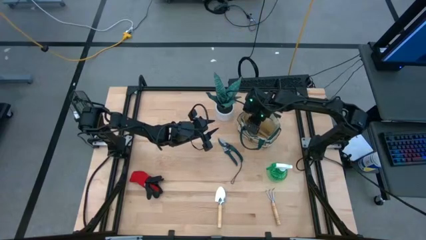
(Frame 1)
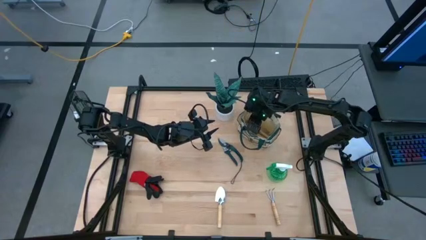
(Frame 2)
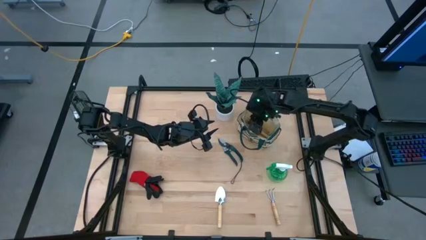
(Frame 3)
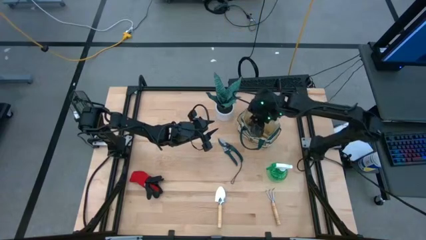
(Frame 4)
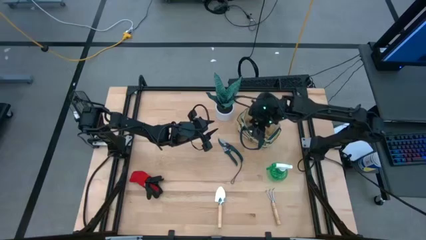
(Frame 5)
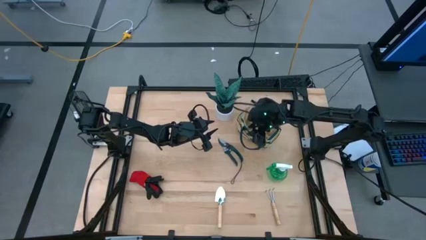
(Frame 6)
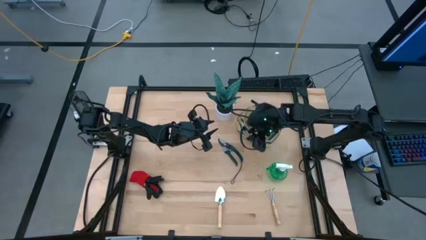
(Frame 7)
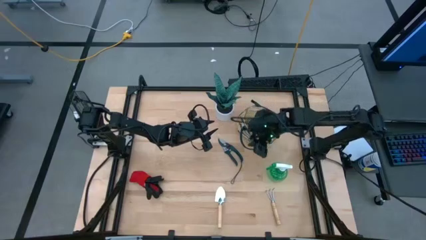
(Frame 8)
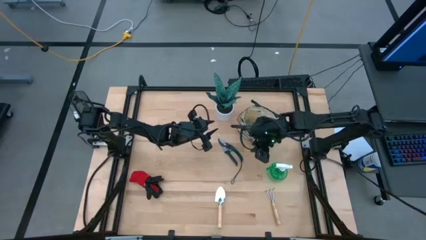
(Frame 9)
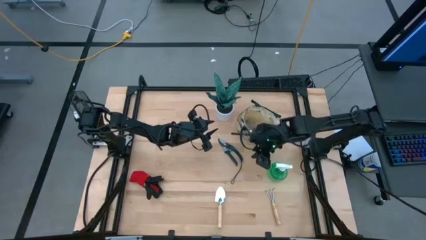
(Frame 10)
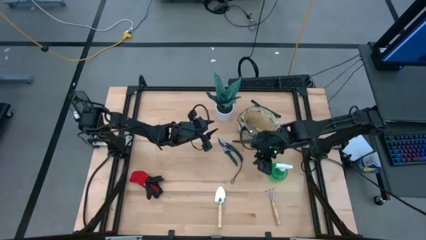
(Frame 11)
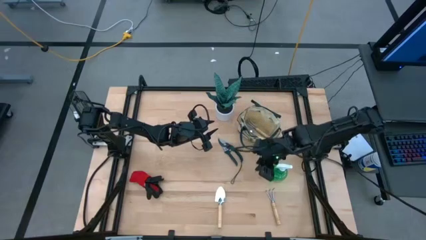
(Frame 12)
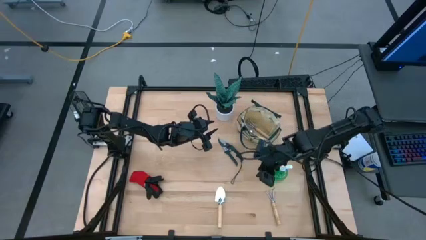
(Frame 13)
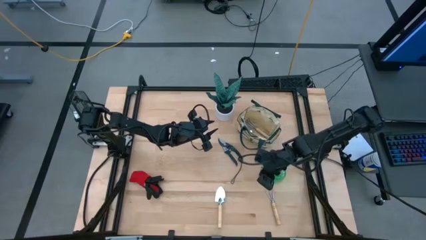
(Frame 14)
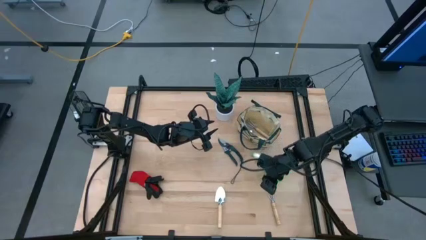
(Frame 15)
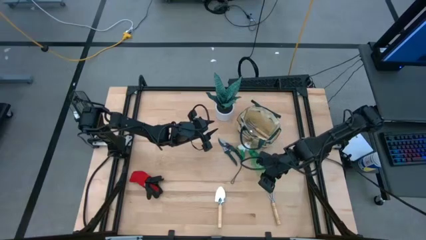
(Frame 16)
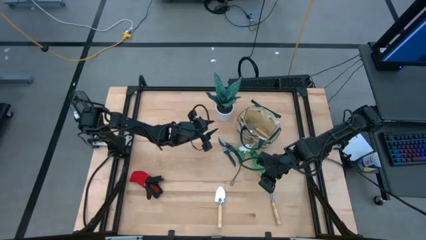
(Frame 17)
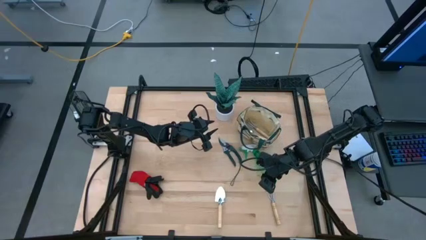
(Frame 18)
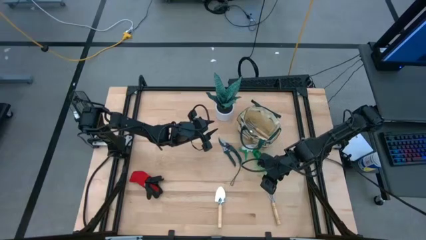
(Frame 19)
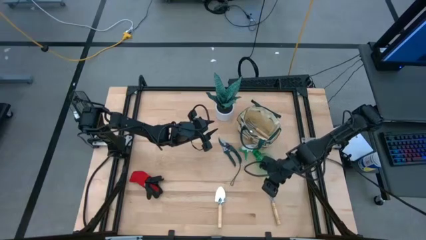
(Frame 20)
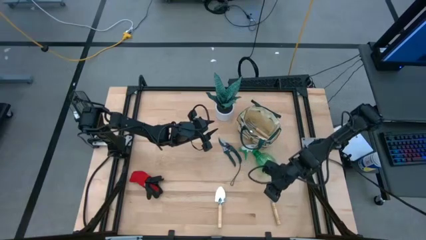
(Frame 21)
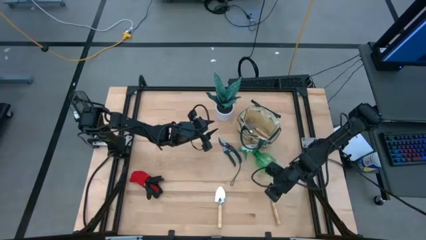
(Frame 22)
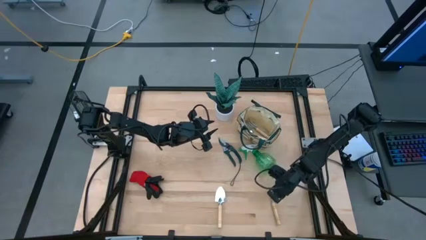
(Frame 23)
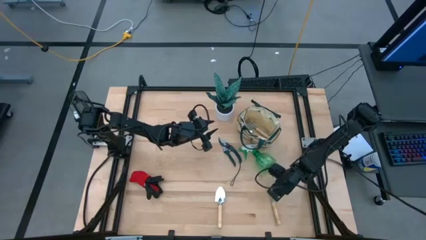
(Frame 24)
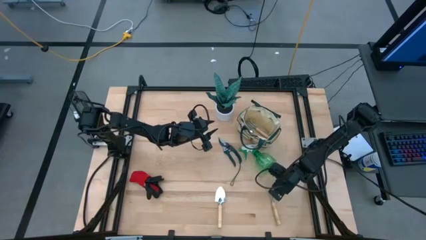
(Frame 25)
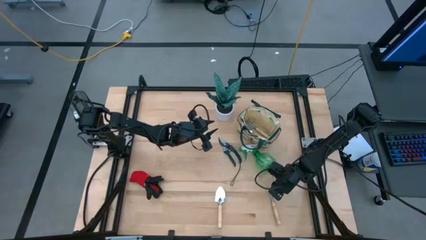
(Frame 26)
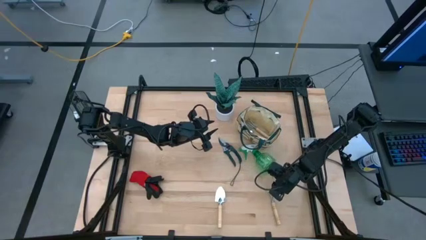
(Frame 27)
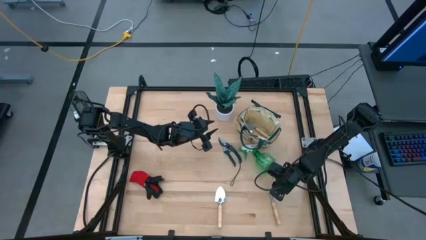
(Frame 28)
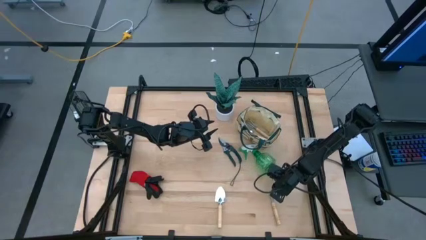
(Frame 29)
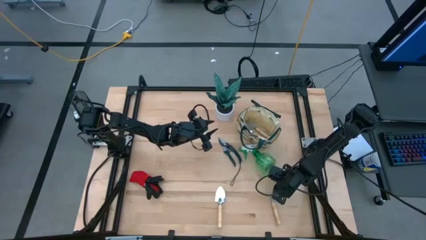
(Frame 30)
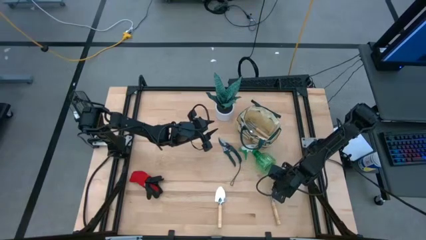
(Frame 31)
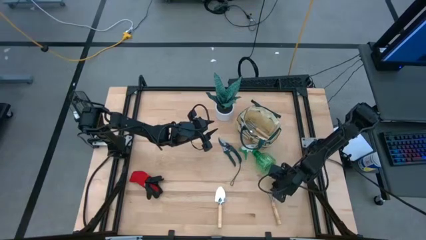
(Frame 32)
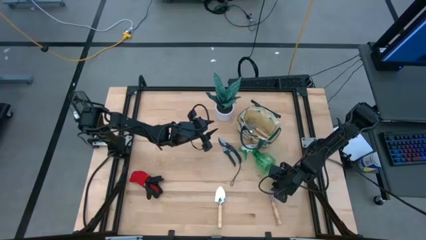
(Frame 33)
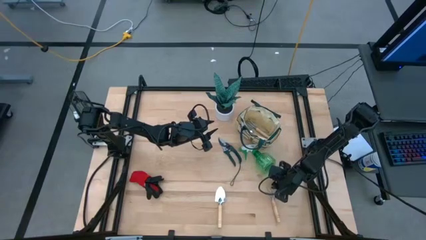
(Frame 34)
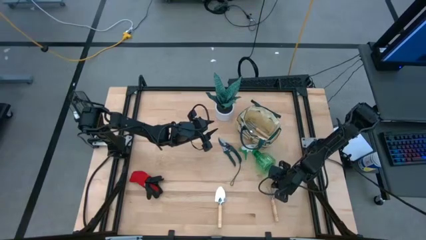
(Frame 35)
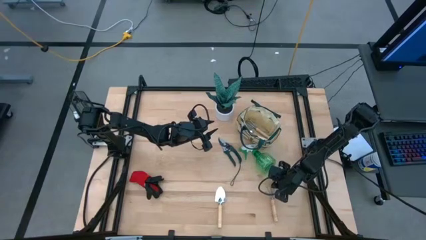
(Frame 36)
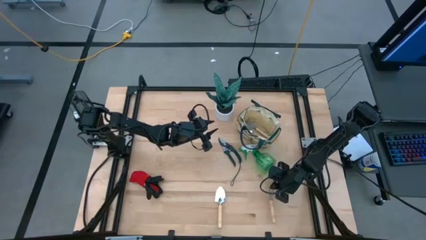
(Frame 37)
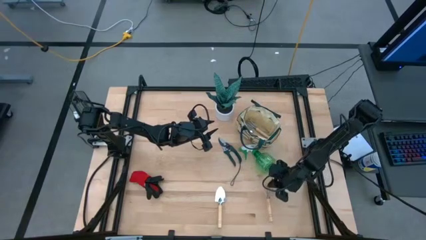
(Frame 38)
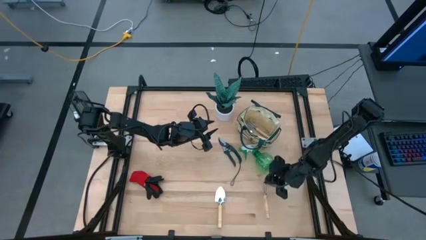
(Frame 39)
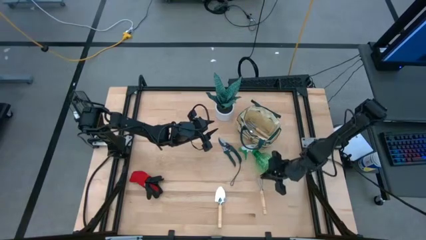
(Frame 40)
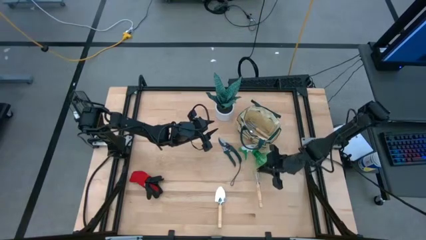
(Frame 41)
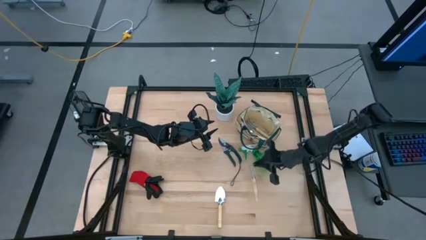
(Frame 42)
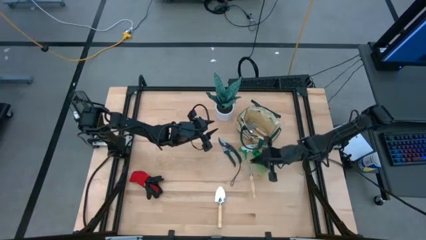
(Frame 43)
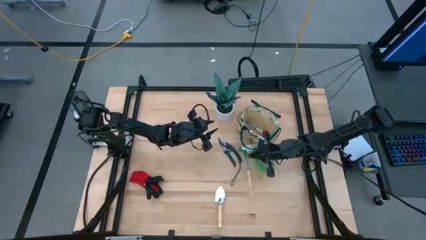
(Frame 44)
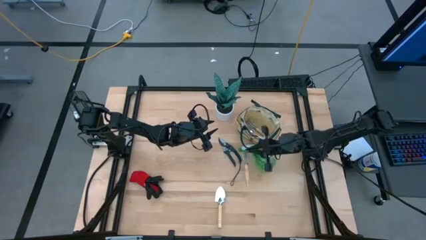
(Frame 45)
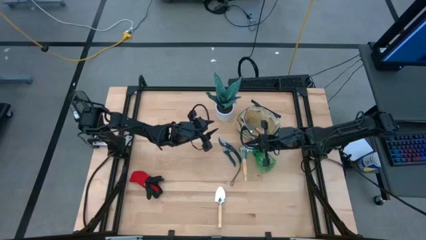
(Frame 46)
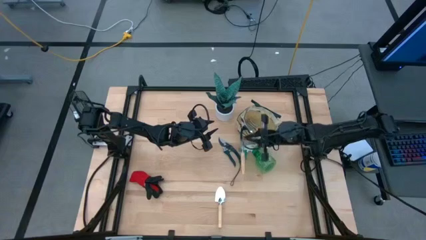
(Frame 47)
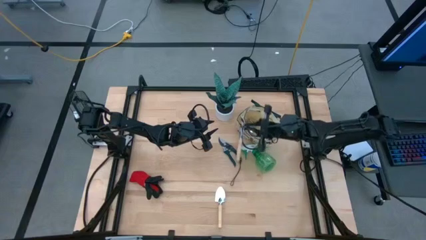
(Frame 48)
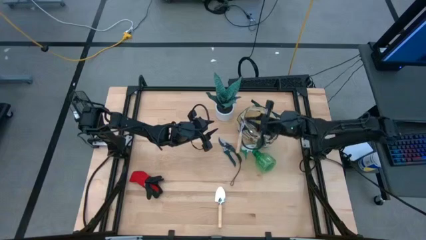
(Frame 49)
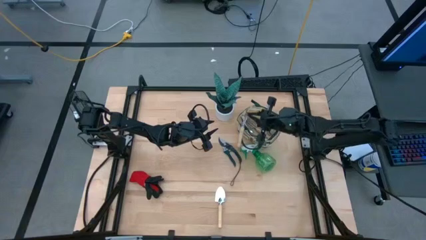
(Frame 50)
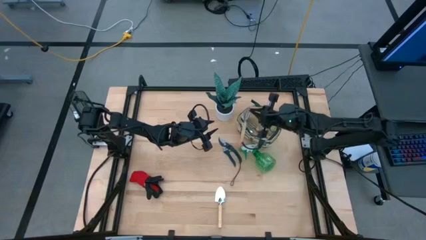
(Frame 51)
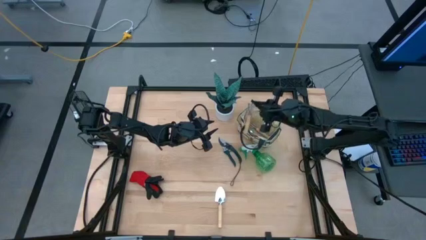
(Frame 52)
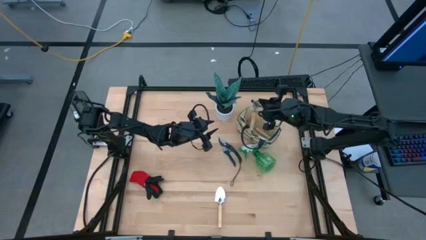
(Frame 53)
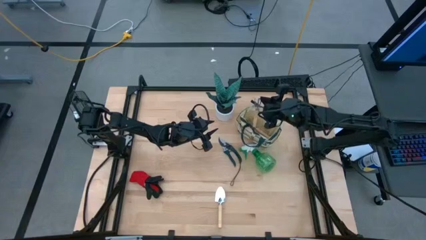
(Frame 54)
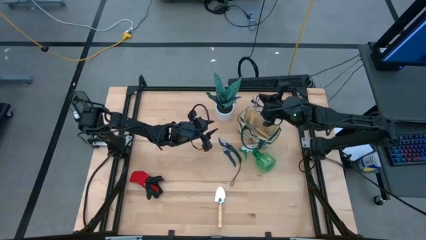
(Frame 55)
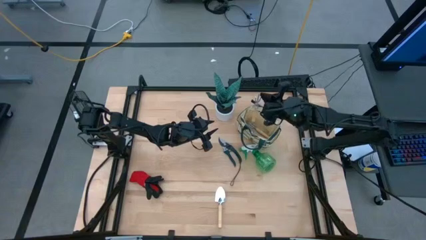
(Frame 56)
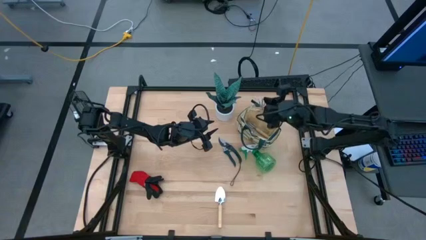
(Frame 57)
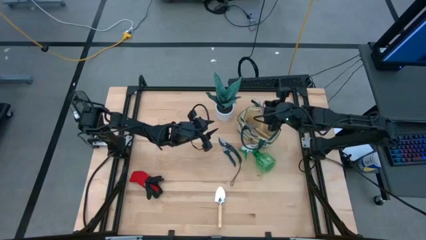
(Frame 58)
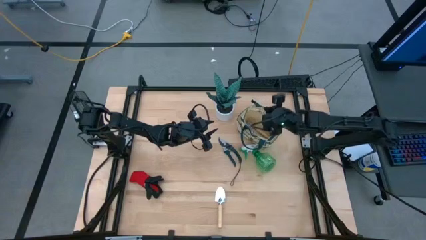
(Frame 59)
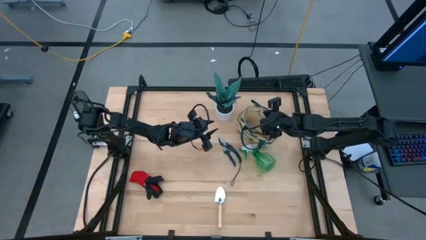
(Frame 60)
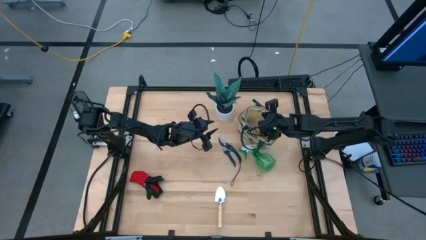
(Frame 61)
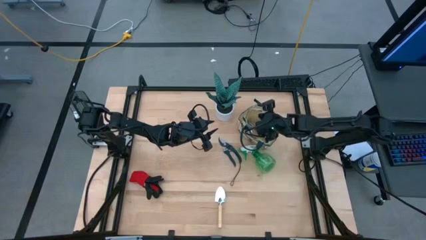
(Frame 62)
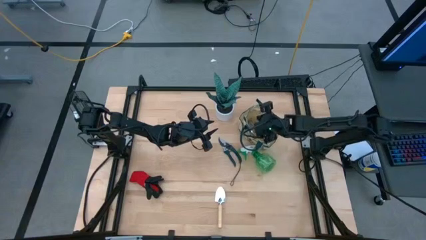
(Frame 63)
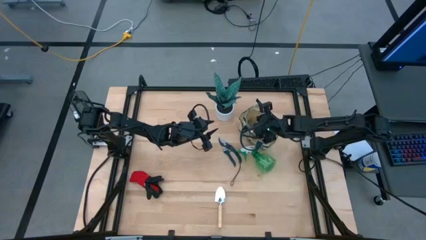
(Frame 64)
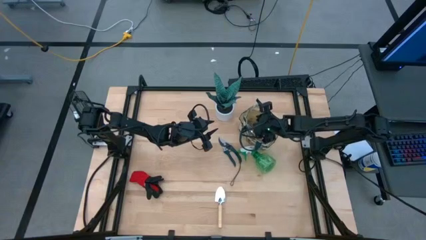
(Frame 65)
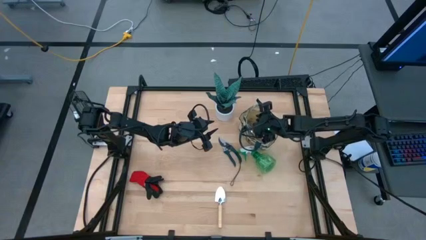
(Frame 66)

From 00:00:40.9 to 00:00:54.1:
Task: Pick & Place Garden tools in Gardening bag
Put the brown hand rake into the gardening bag
